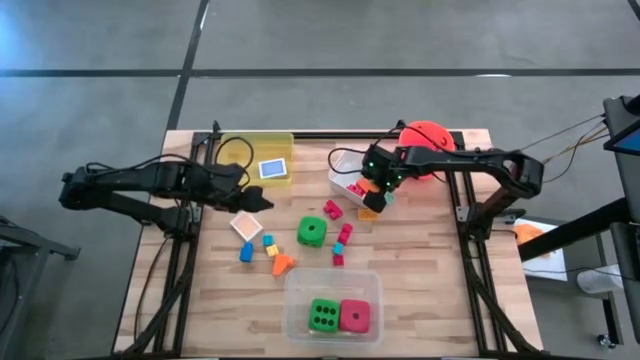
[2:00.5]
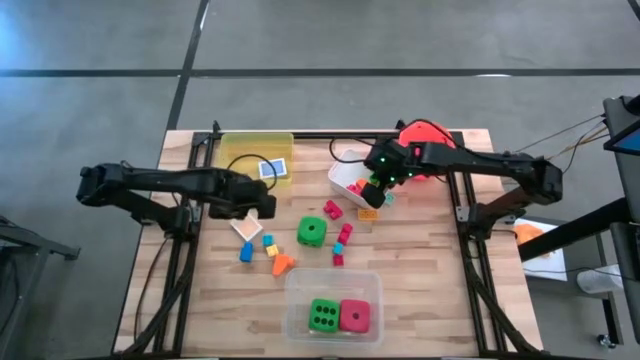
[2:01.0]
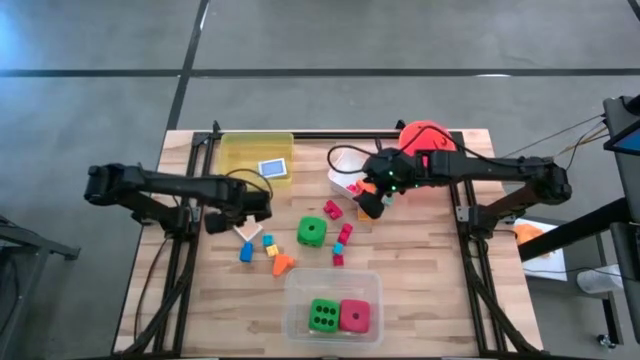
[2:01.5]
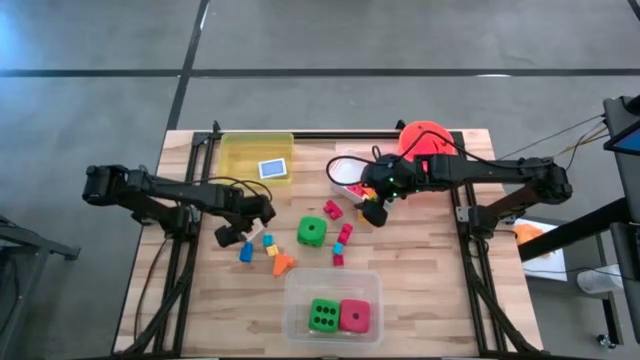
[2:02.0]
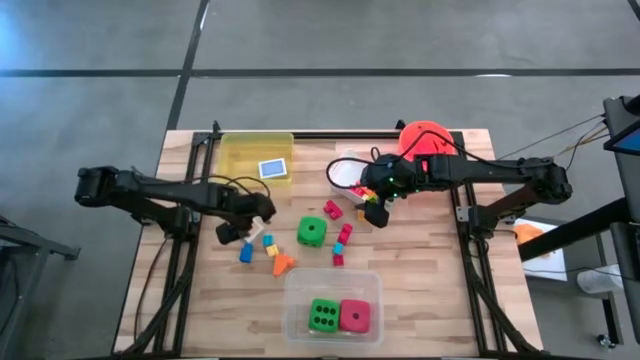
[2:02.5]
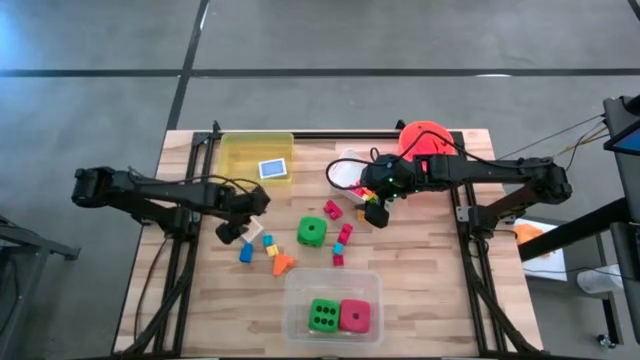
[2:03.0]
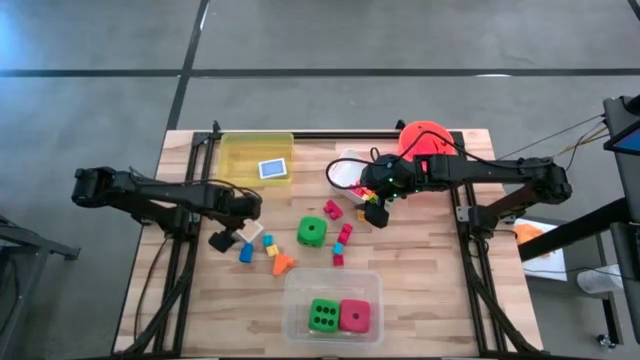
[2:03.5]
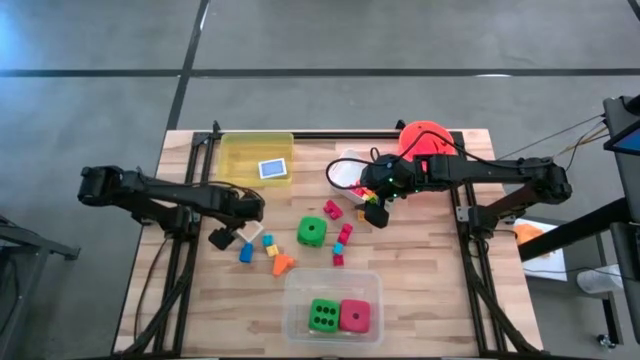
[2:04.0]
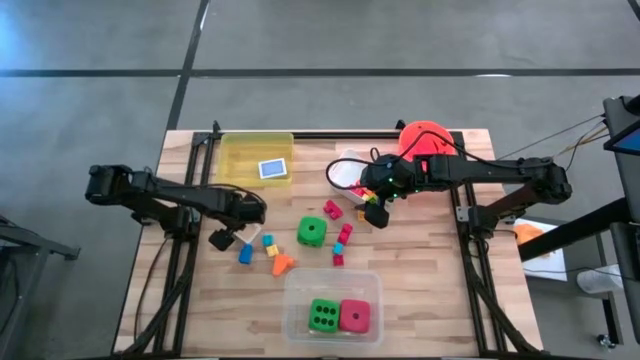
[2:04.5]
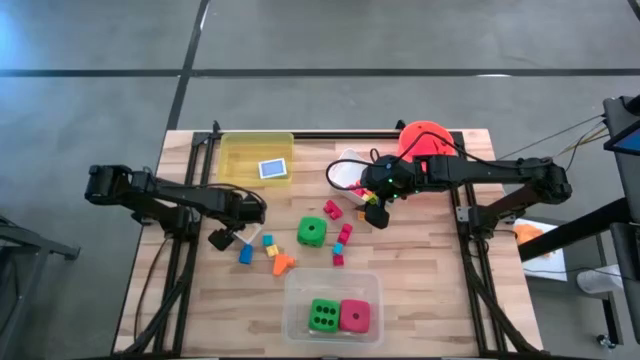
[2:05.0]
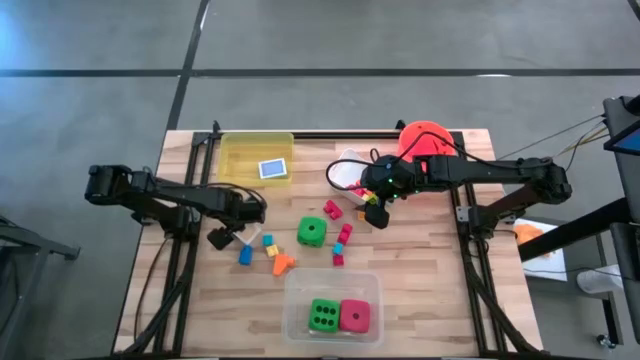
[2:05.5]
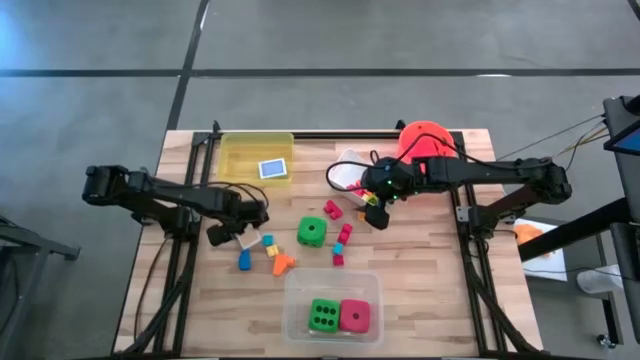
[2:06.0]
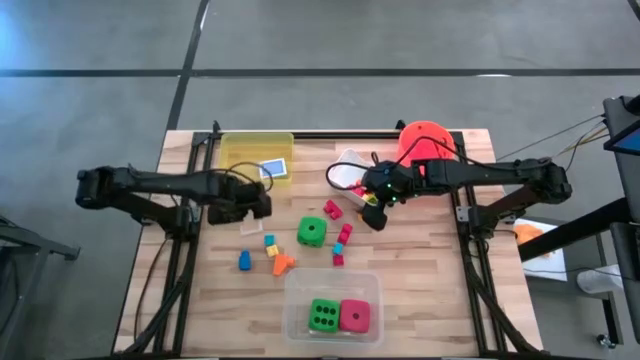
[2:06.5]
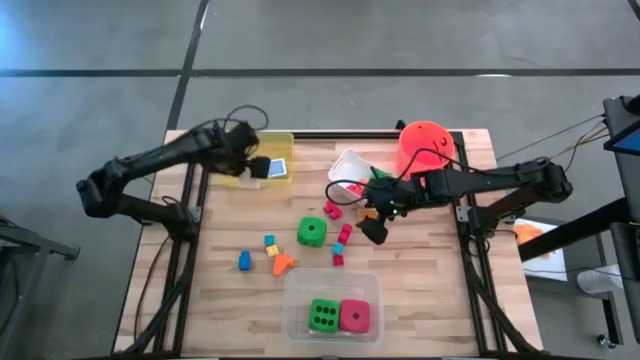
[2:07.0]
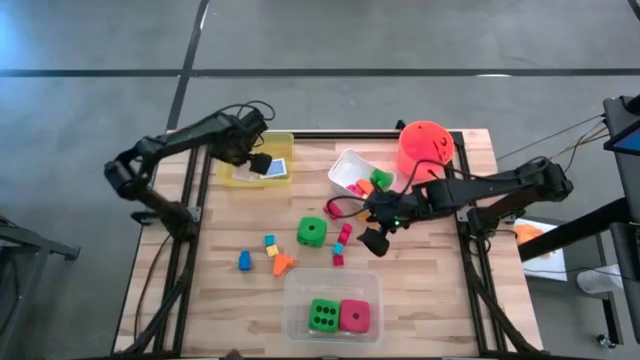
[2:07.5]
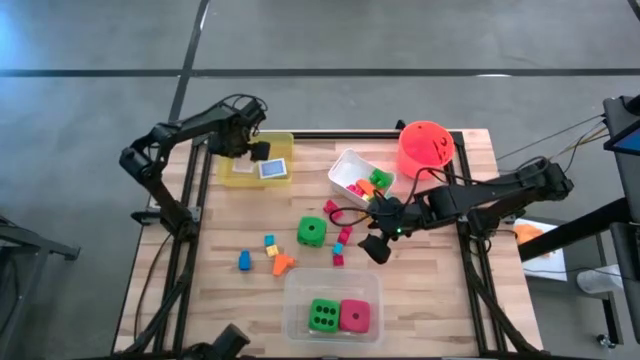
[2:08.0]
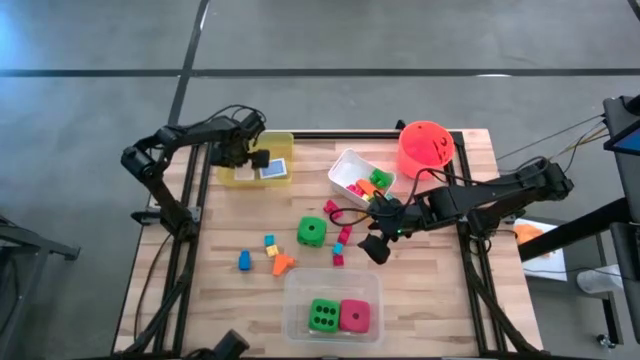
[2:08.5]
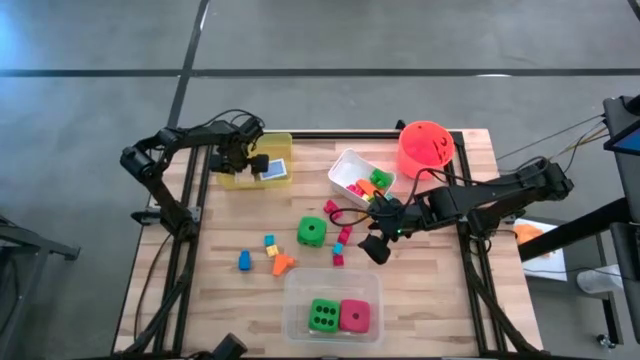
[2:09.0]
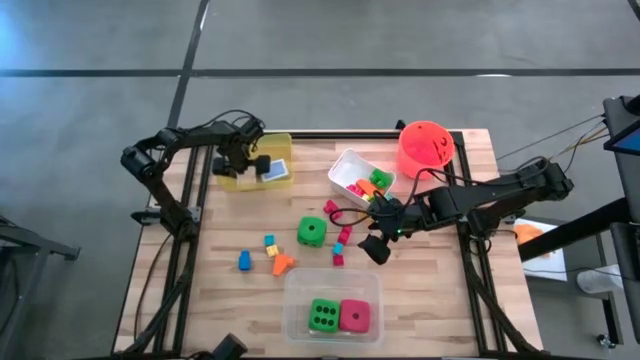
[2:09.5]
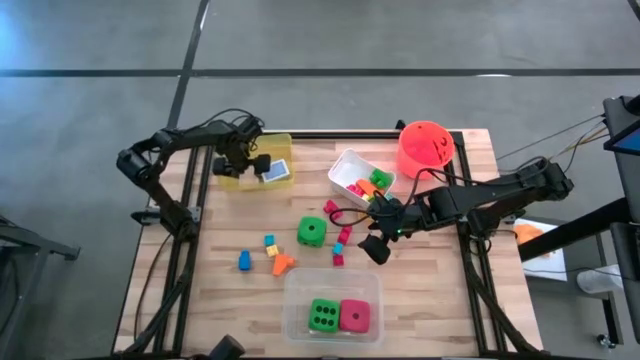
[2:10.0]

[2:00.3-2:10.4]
Task: Pick & Place Toys
Put the yellow deck of cards into the yellow bin

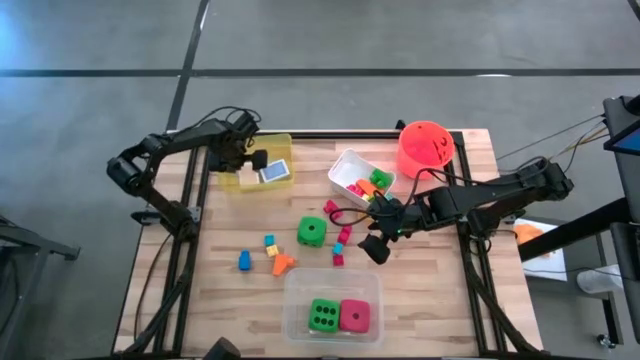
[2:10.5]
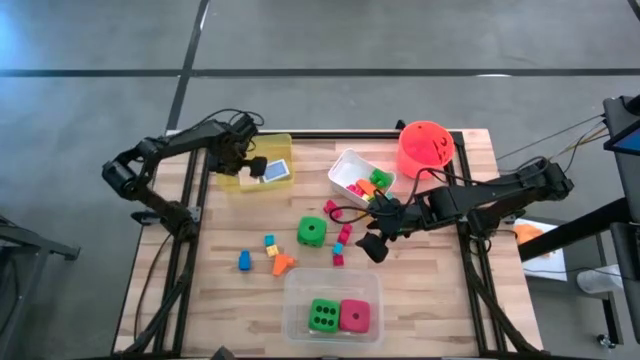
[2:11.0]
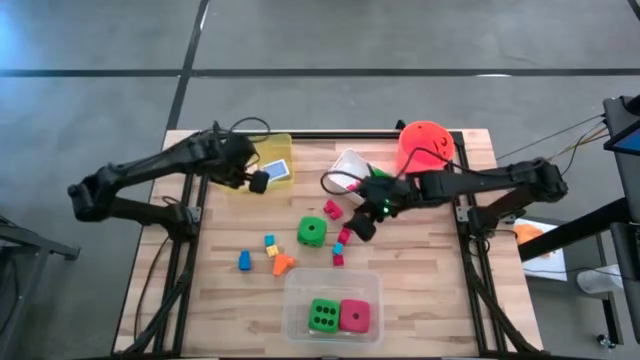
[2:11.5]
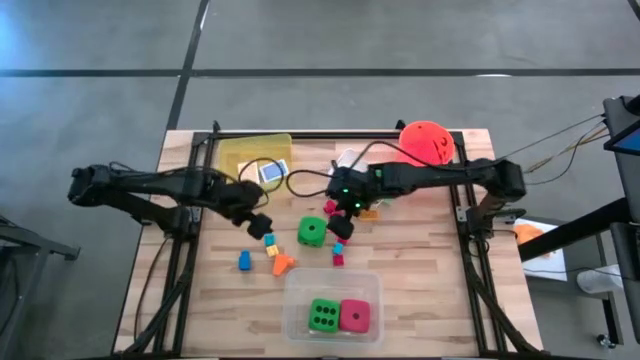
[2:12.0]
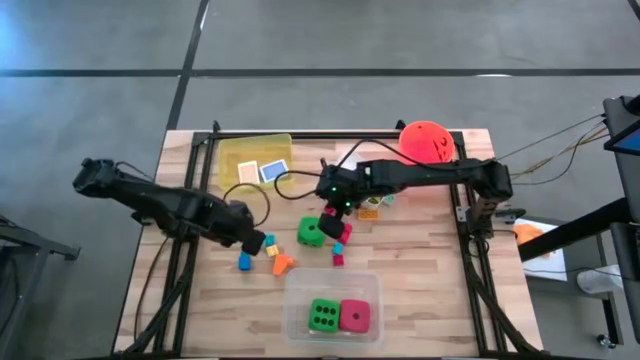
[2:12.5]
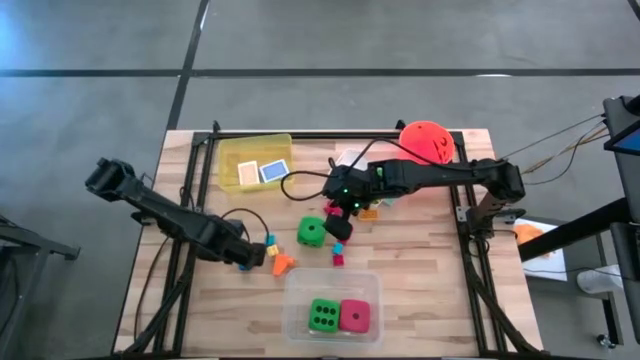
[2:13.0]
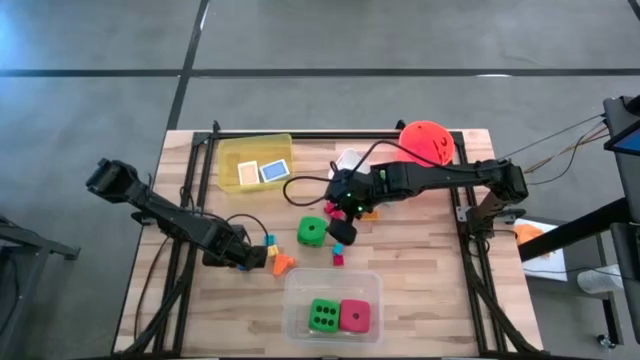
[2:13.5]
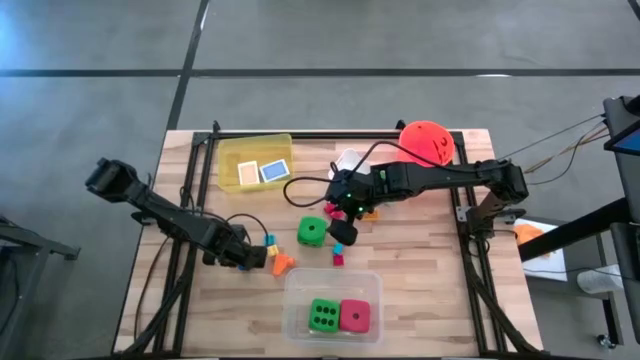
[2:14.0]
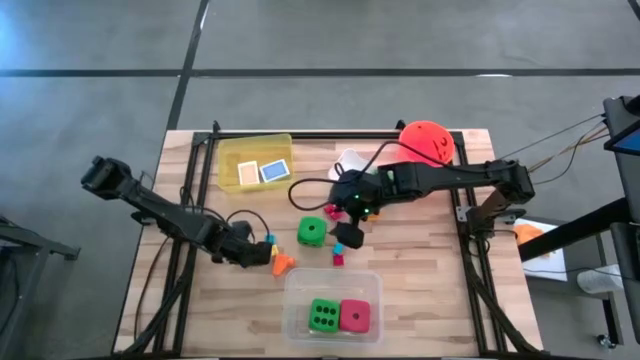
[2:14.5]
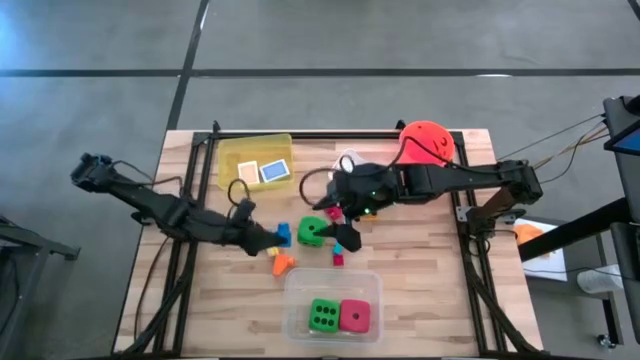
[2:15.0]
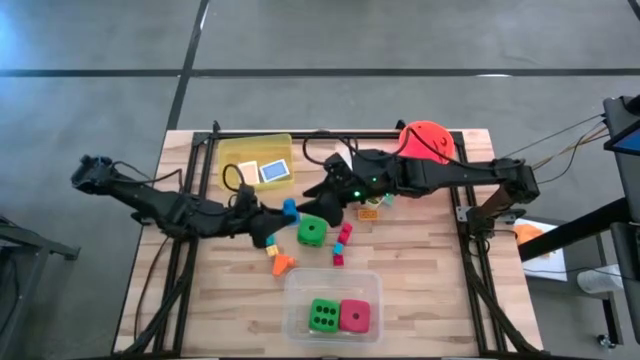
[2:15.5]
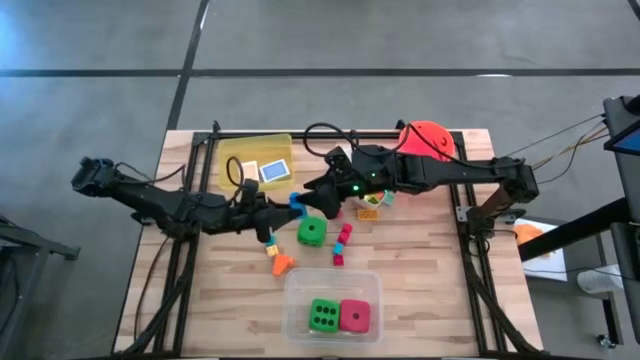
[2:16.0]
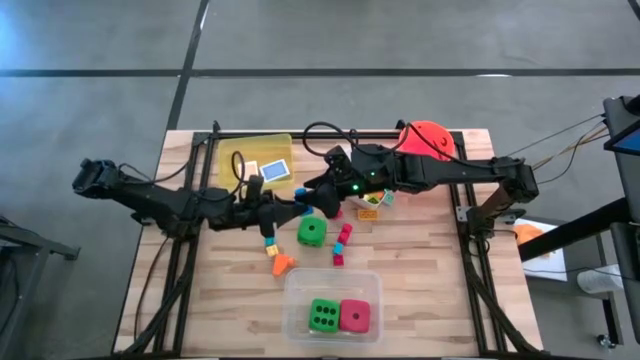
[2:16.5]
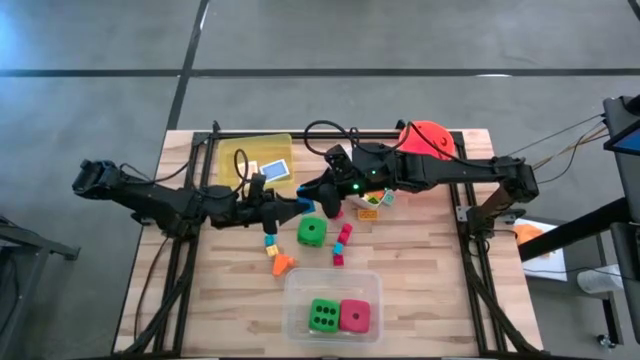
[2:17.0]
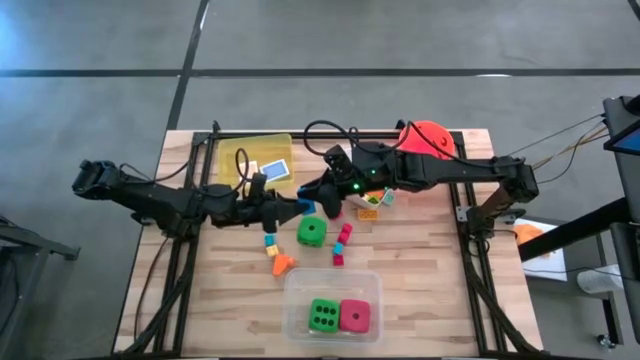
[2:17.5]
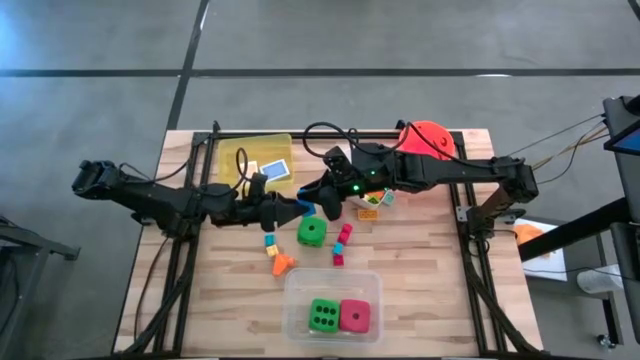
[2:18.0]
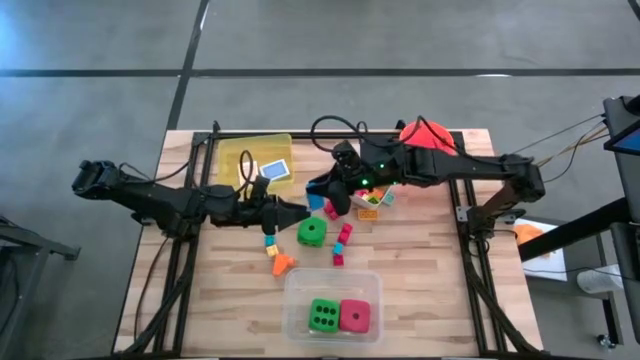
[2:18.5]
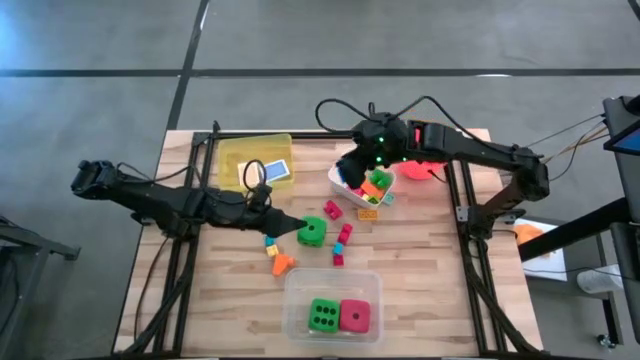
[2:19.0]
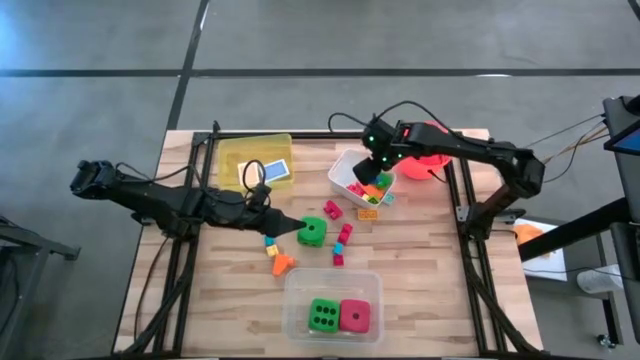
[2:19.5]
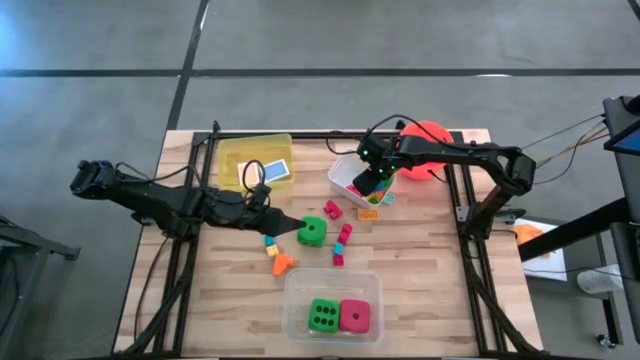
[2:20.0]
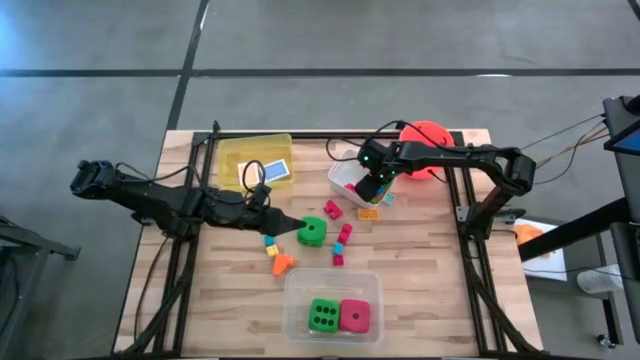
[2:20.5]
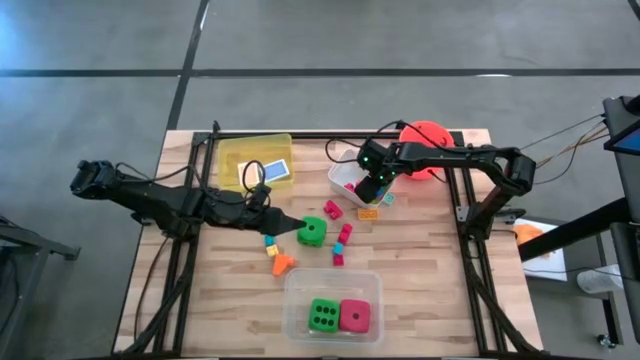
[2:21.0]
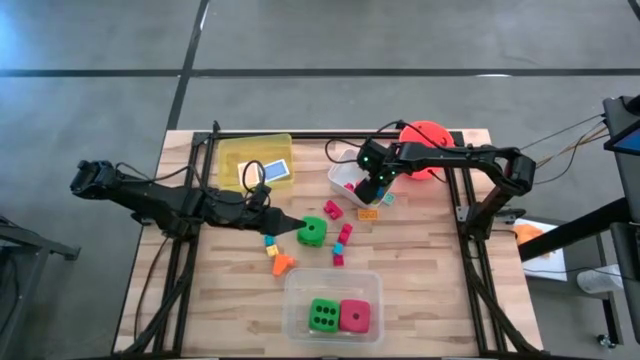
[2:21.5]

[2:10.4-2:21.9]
Put the blue game piece into the white bin

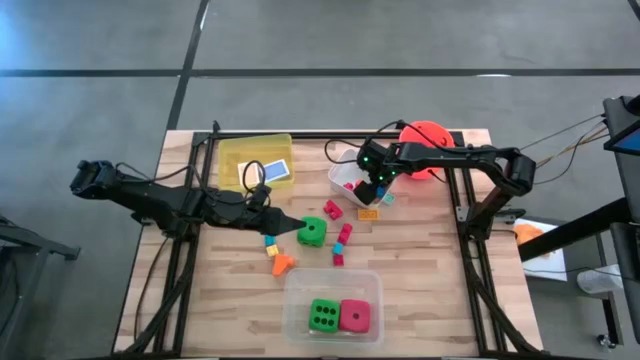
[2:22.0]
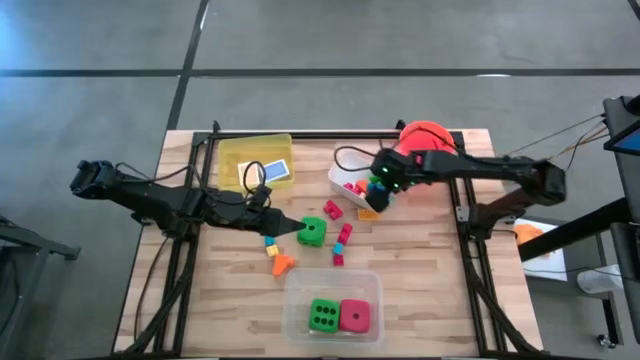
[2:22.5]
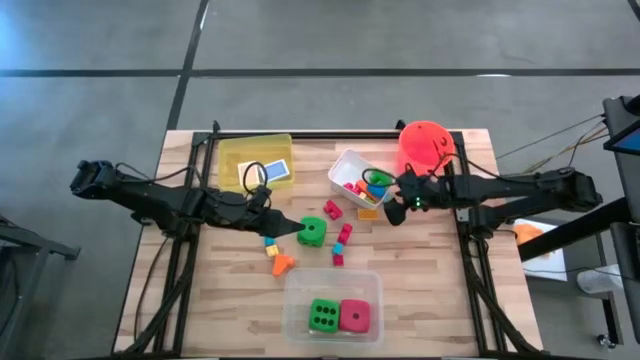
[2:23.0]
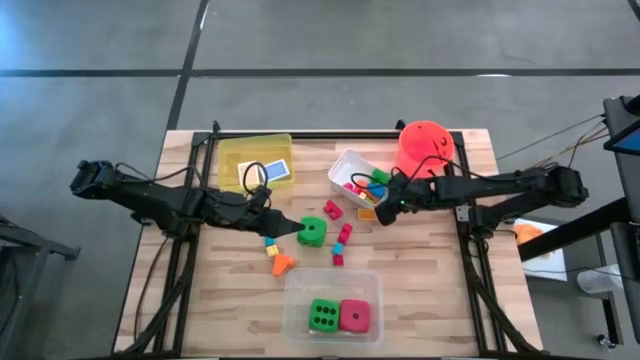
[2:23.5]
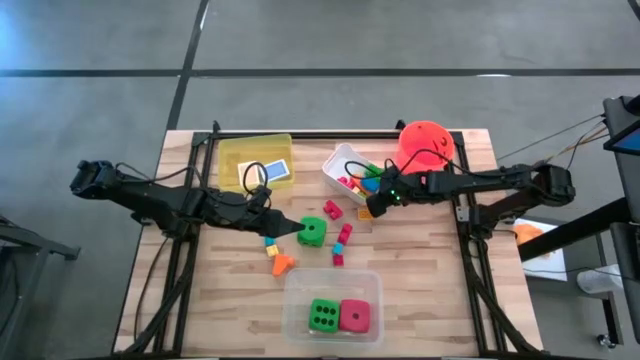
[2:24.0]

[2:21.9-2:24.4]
Adjust the white bin
